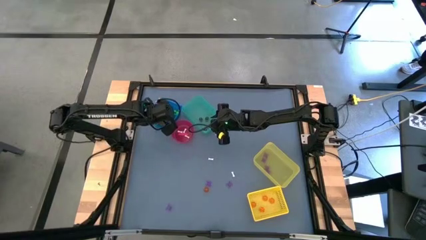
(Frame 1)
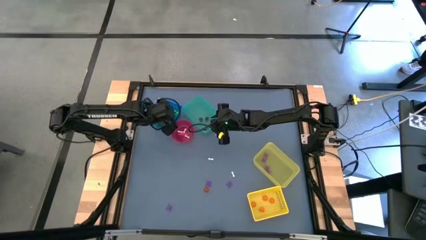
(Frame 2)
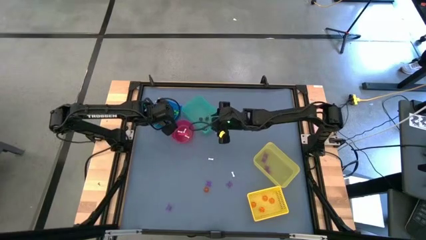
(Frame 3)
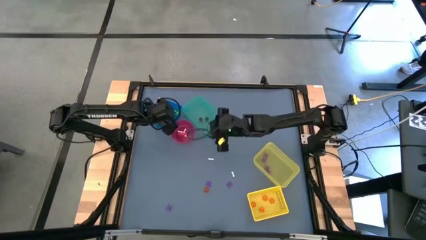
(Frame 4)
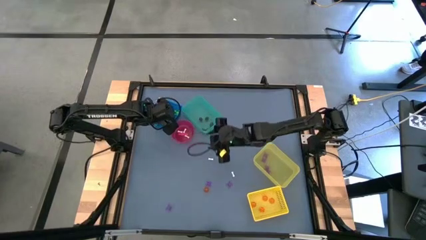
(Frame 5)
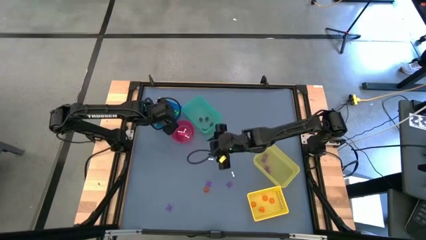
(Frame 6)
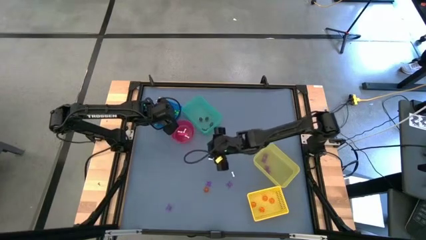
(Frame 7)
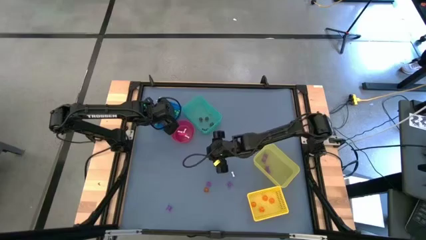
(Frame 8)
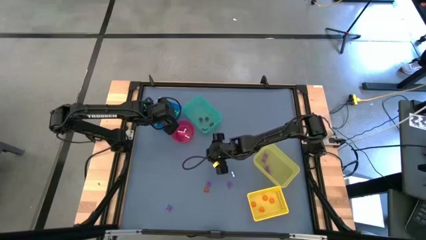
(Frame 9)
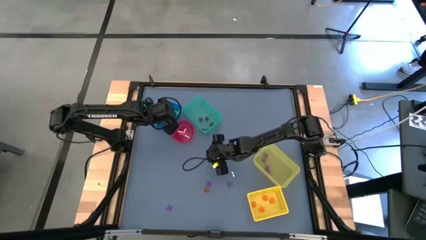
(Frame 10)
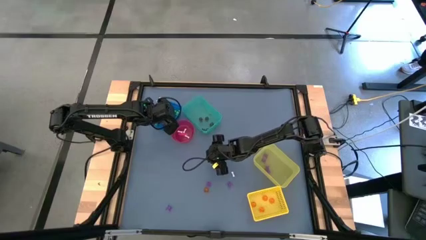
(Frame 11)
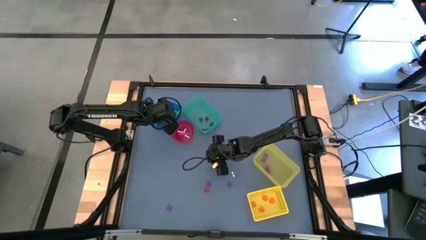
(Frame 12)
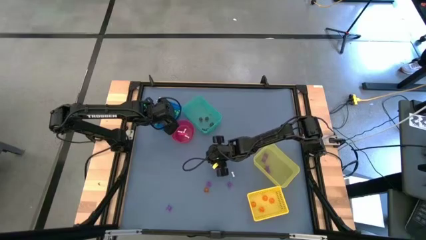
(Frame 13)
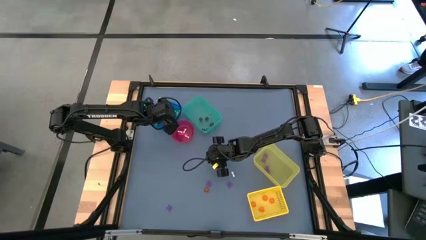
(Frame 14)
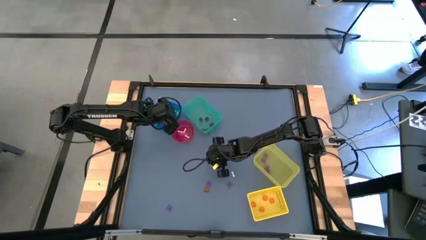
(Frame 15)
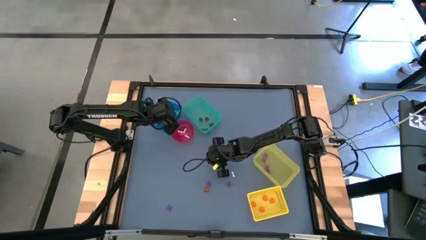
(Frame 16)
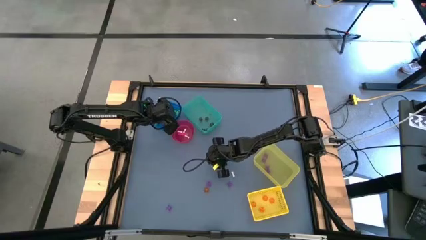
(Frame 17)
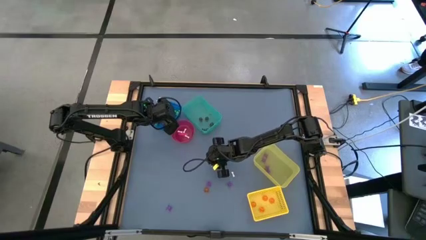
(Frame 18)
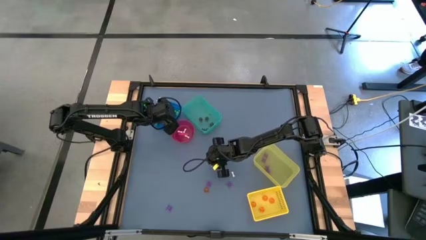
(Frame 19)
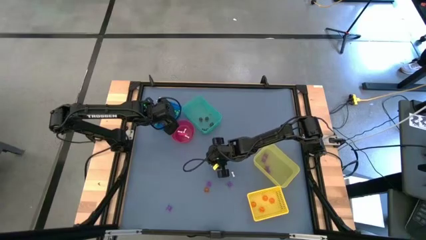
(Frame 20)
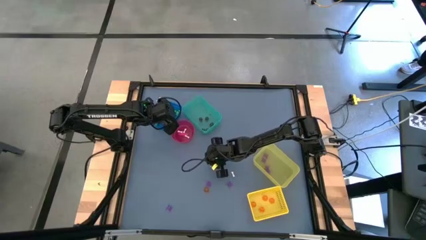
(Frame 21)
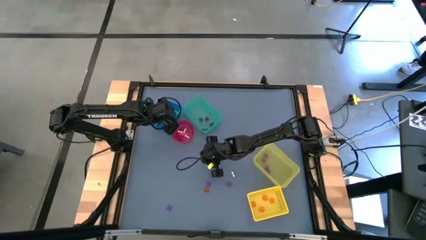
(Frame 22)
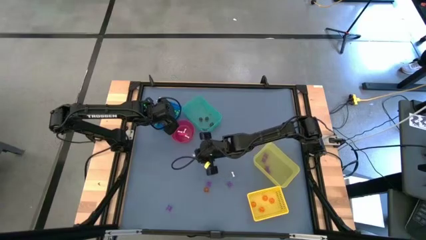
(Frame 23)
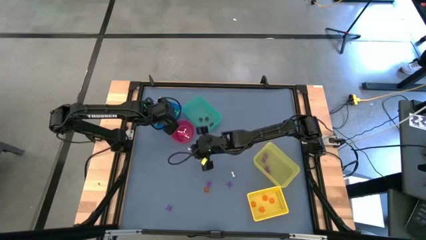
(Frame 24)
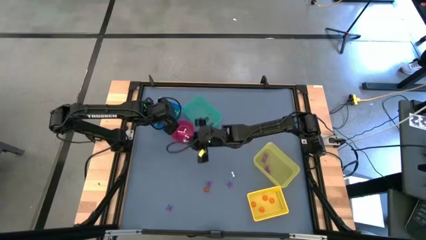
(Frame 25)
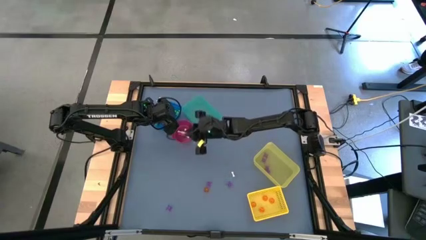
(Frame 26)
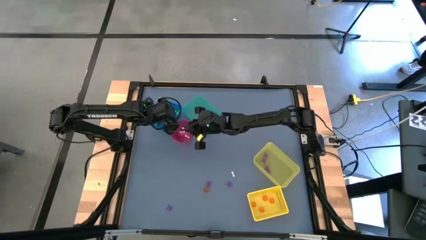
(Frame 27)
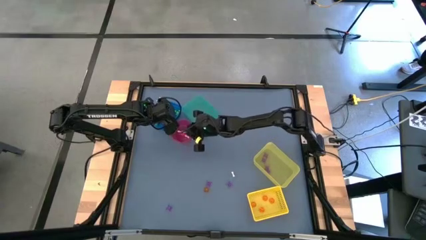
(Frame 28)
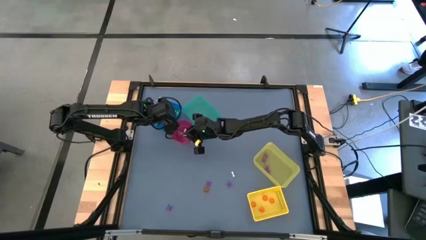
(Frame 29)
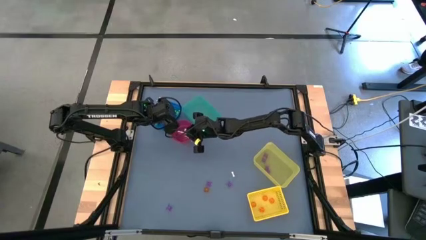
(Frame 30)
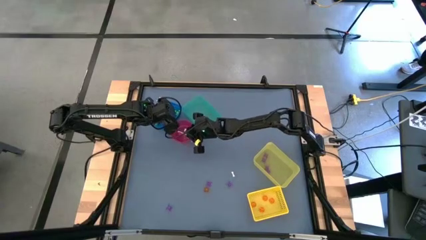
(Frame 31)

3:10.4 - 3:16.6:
Task: Sort Halloween decoration
Put the white bone toy into the red bin

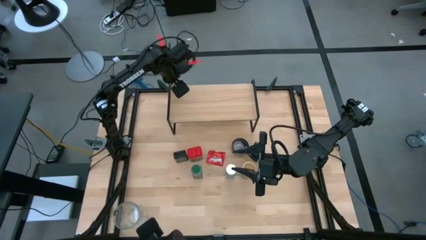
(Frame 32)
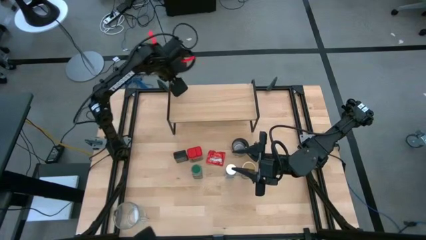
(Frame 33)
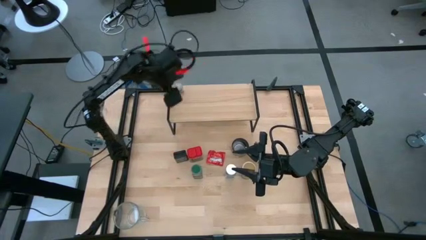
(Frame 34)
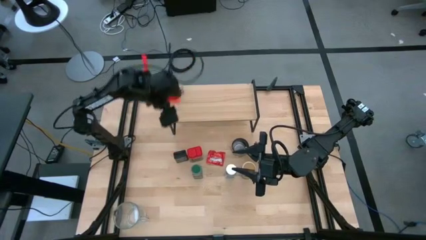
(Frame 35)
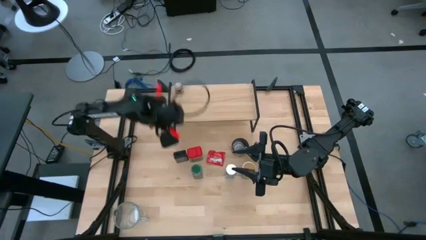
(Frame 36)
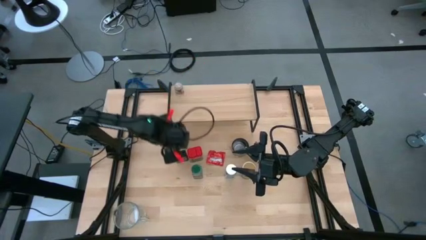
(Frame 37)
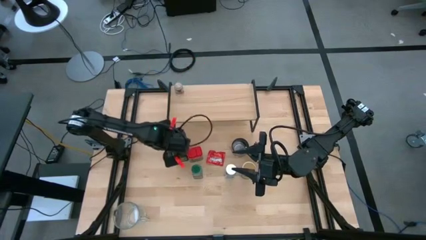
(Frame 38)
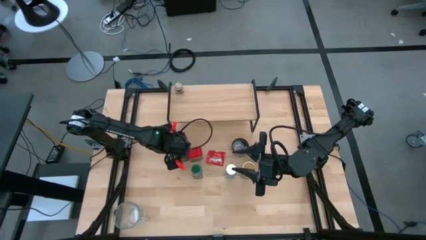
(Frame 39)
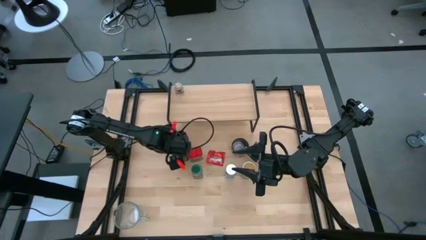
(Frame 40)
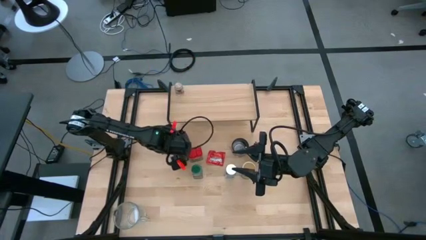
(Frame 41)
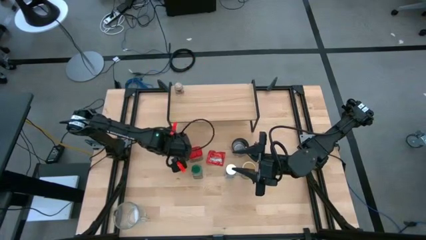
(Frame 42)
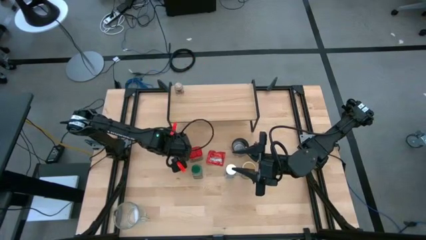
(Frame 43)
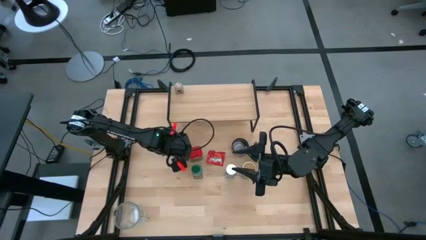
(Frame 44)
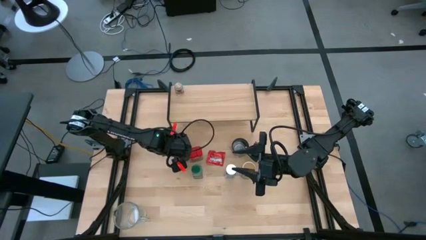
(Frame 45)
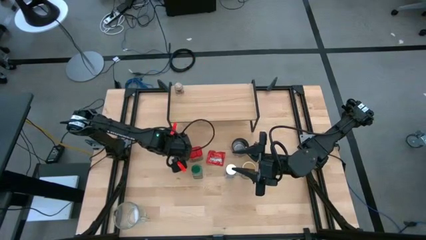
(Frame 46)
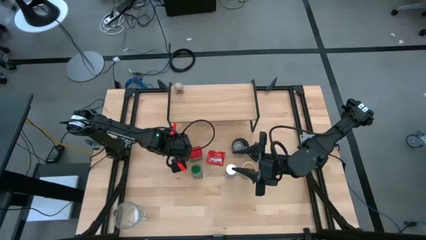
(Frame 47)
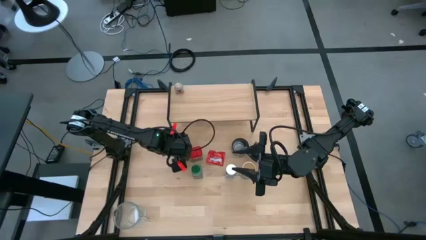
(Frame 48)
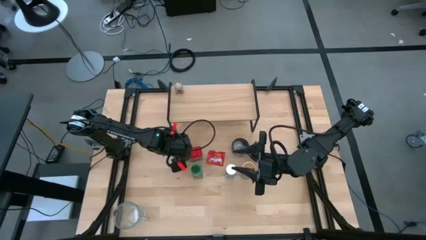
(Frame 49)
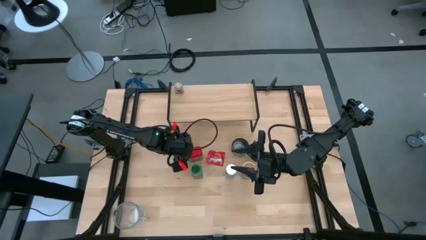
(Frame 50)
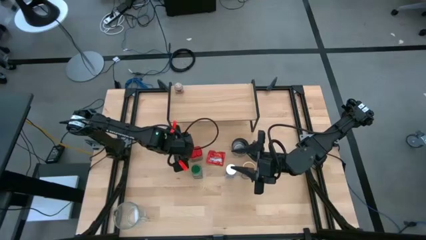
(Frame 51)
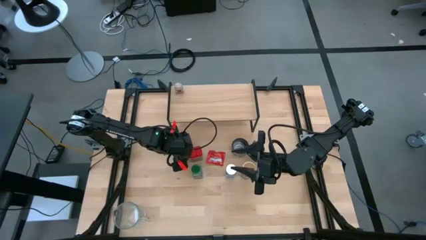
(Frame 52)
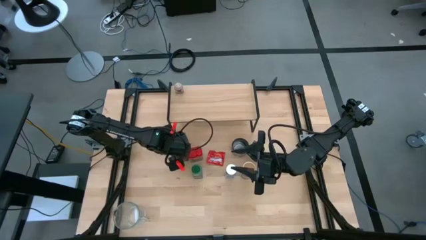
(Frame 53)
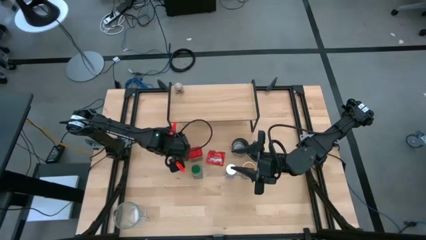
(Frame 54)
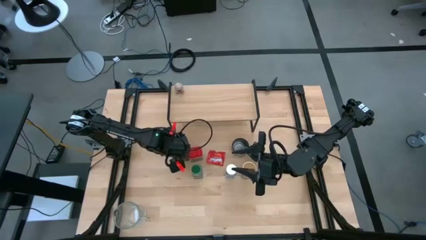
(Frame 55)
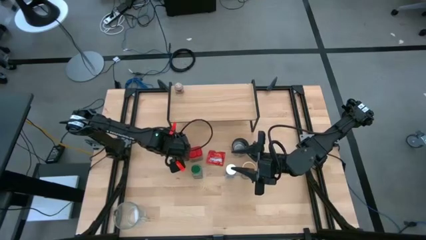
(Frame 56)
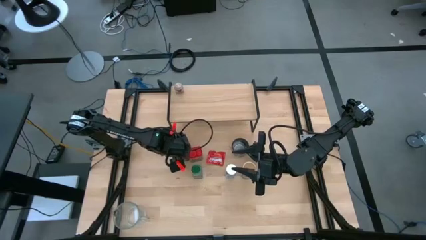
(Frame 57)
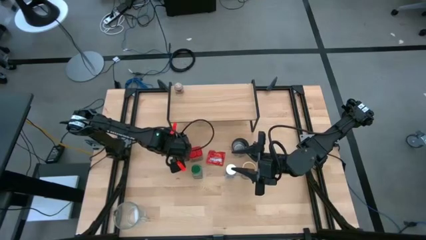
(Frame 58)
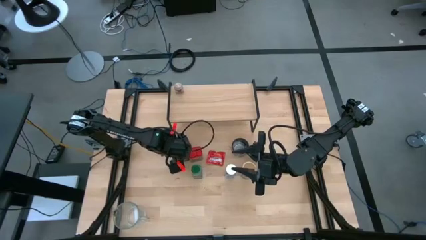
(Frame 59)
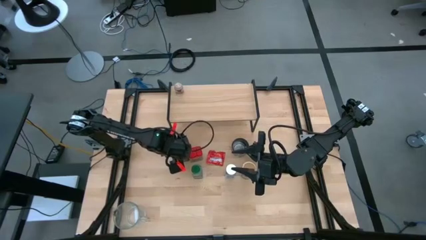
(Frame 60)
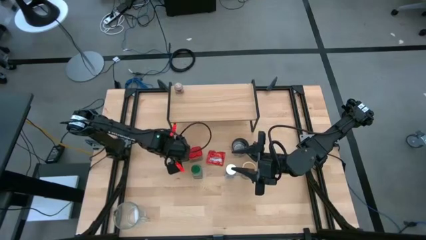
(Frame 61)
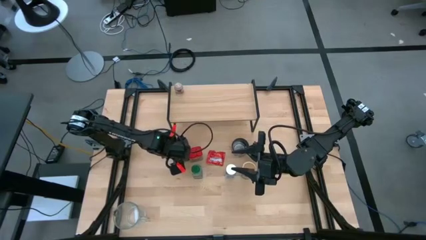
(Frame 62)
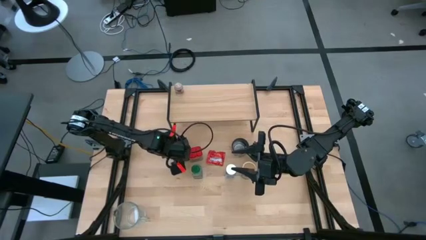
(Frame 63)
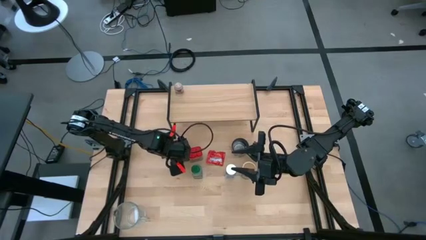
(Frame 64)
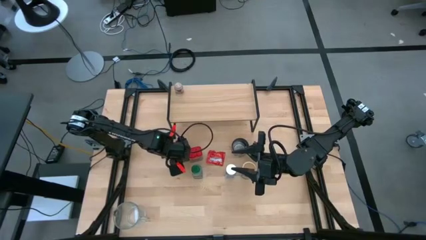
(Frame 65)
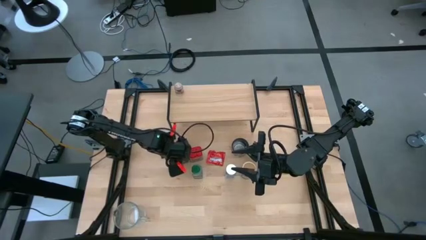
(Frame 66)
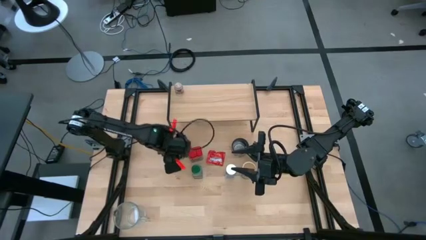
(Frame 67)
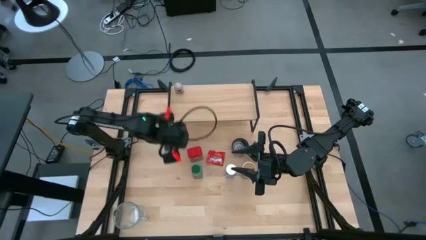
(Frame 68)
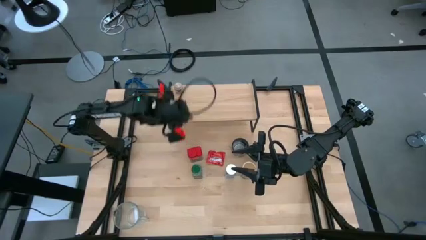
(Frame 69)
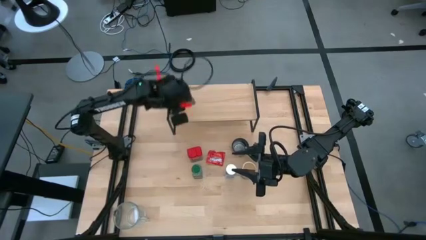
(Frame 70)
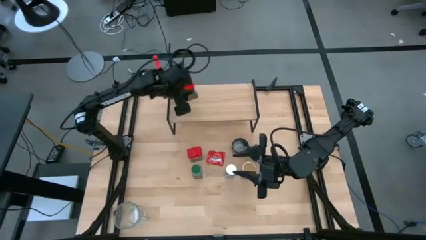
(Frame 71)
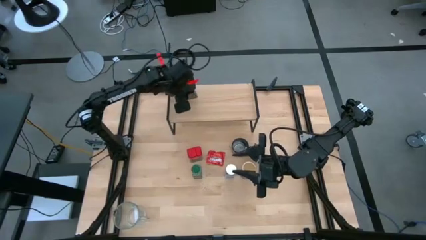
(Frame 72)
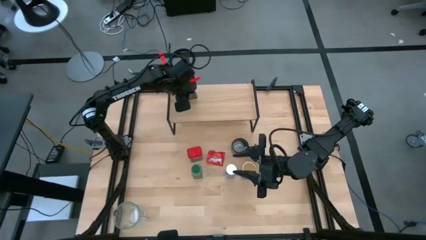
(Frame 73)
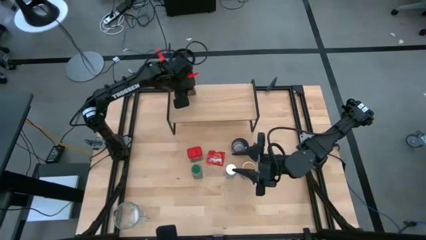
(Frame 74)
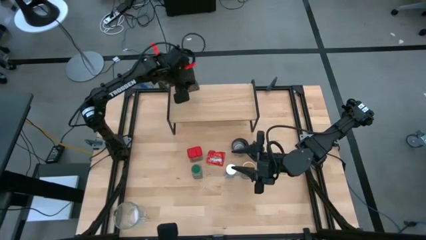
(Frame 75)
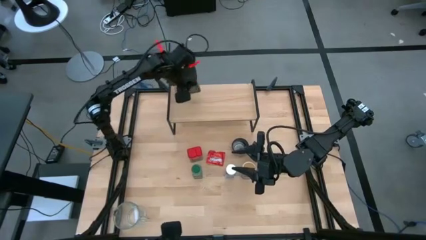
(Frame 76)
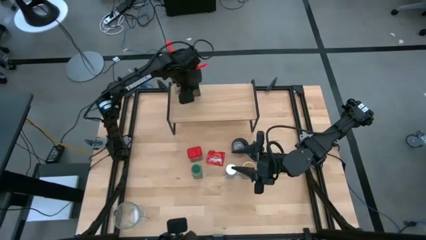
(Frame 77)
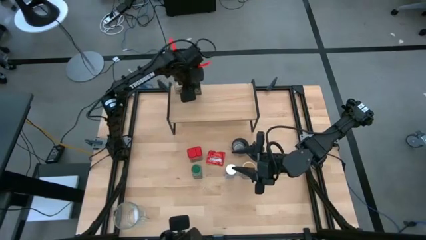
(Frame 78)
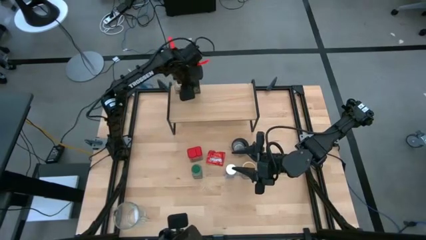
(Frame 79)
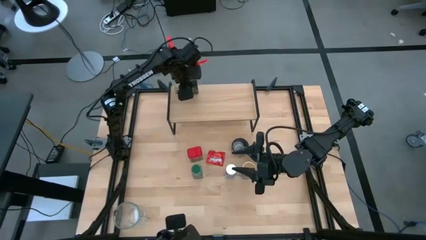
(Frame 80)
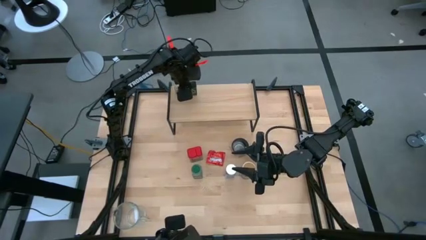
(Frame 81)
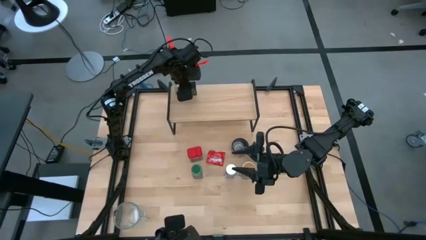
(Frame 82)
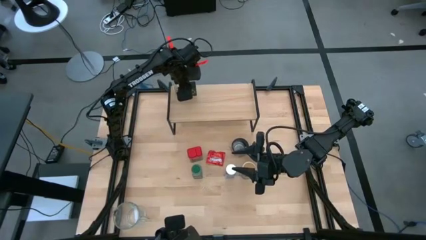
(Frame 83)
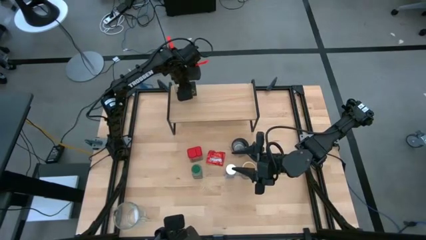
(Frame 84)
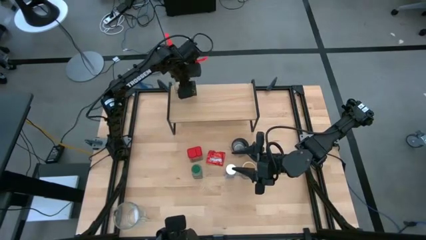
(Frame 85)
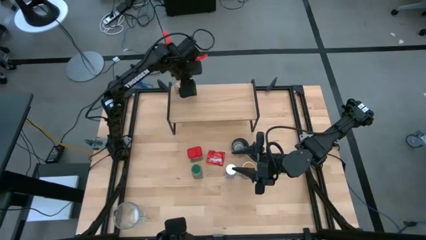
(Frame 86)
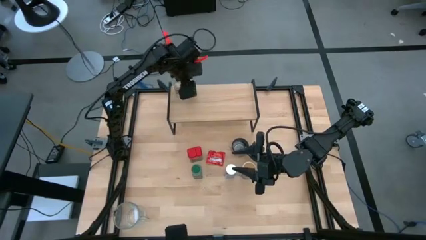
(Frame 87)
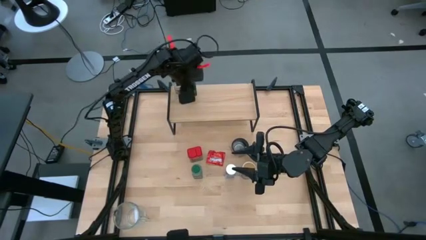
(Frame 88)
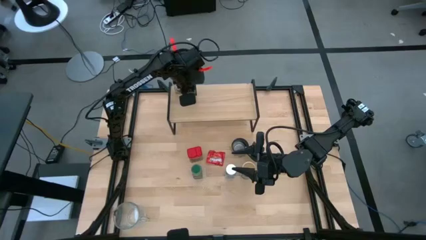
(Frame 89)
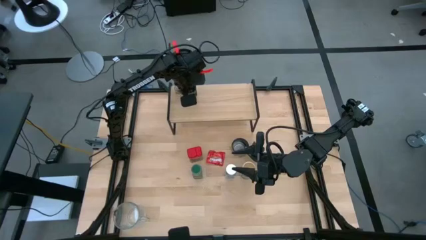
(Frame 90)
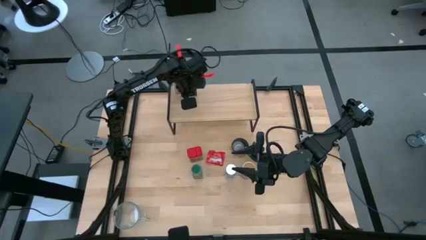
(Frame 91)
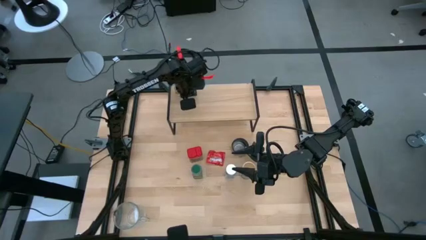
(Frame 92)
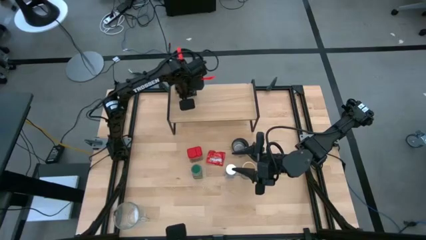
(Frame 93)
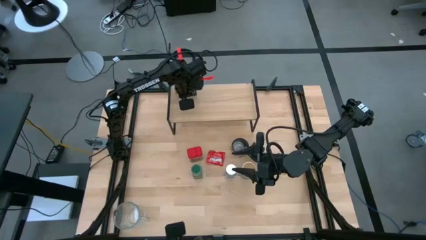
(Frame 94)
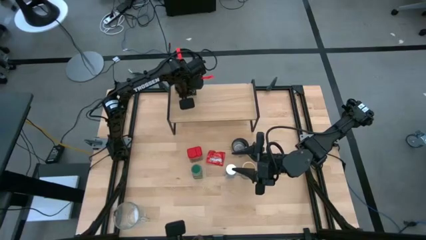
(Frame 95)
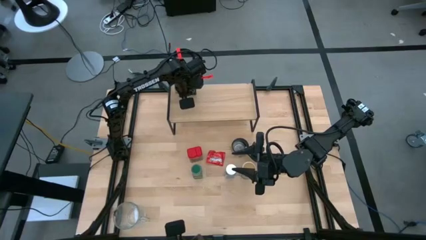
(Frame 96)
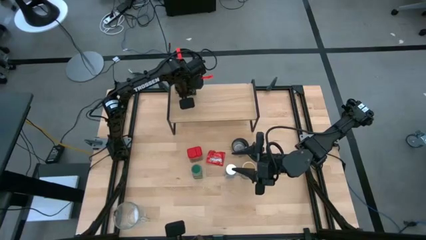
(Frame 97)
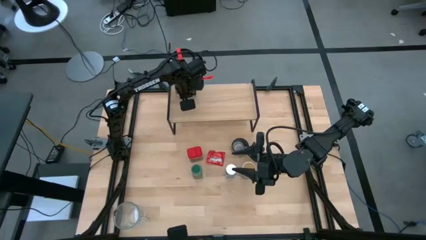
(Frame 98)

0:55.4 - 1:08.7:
Task: Shelf spices
Put the black seasoning can on the shelf
